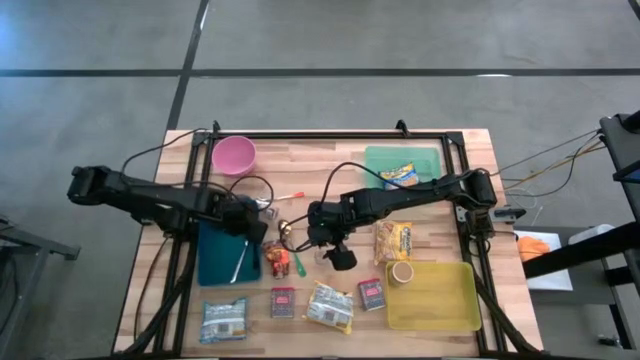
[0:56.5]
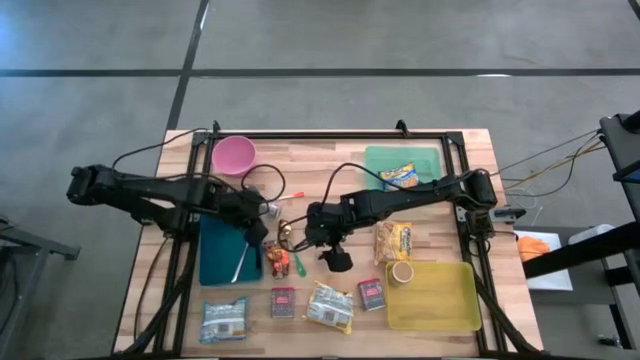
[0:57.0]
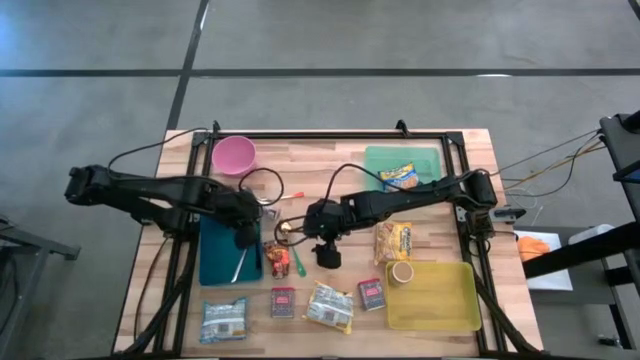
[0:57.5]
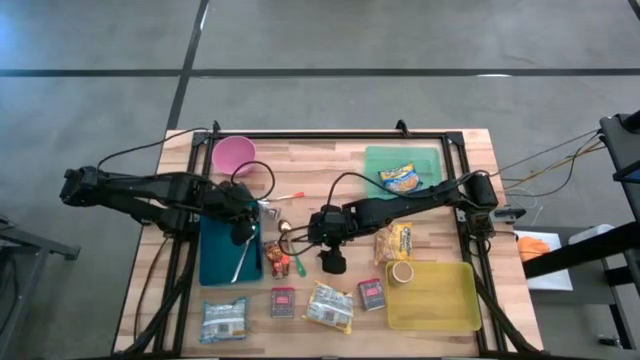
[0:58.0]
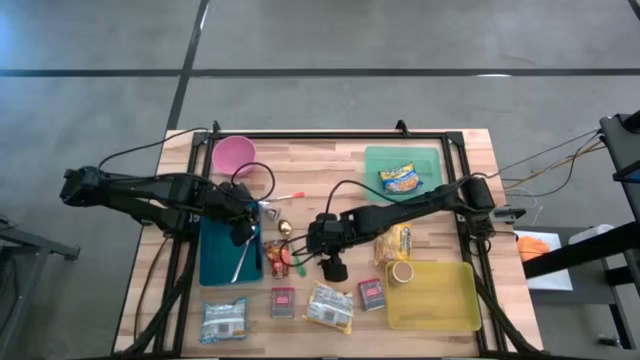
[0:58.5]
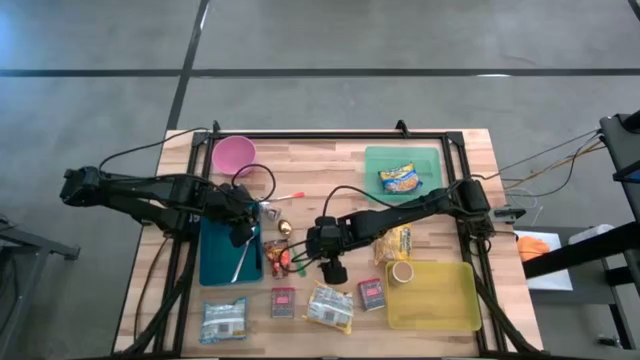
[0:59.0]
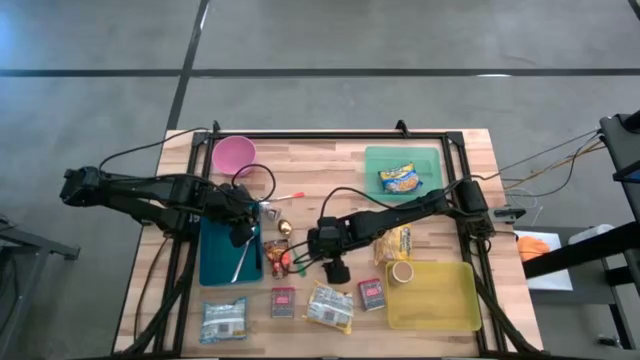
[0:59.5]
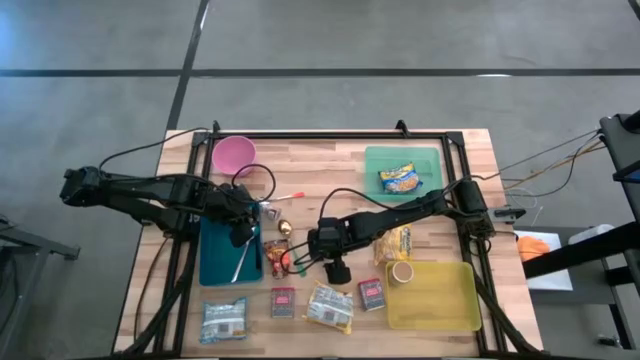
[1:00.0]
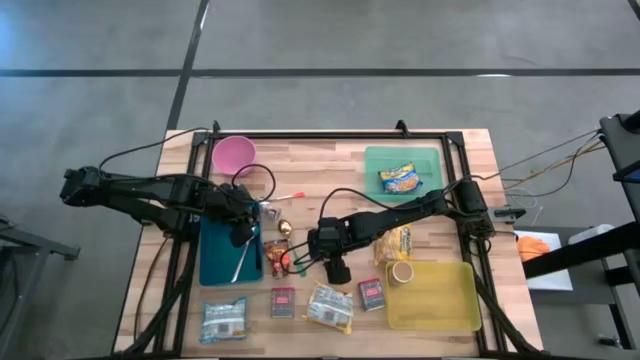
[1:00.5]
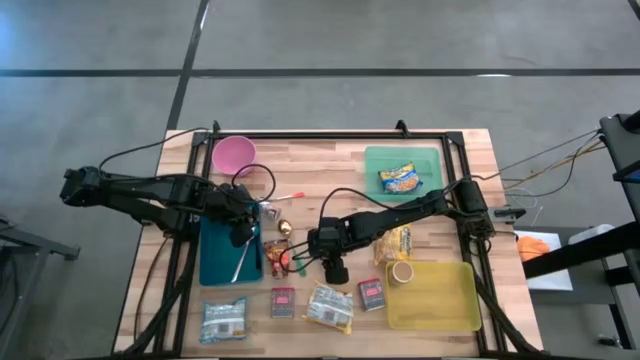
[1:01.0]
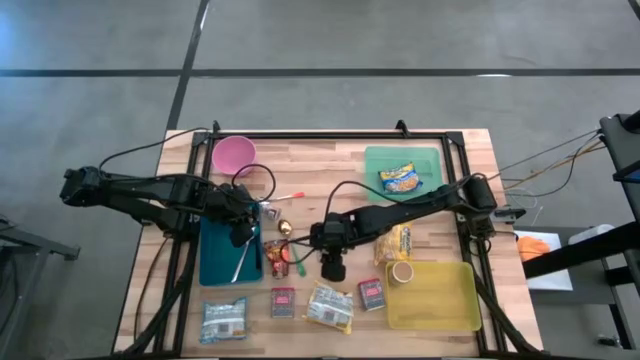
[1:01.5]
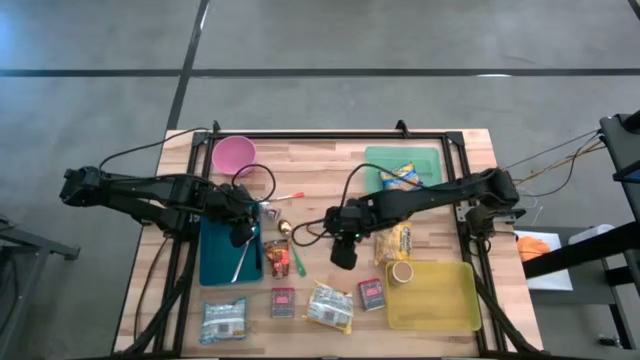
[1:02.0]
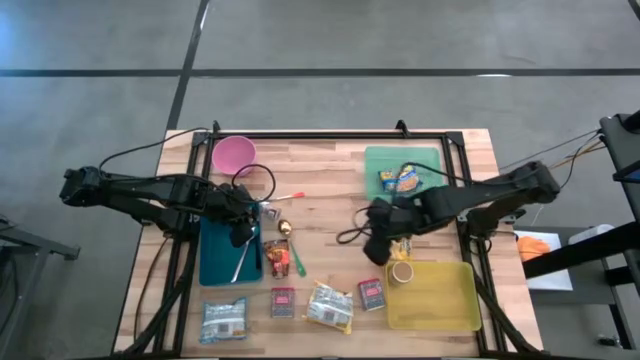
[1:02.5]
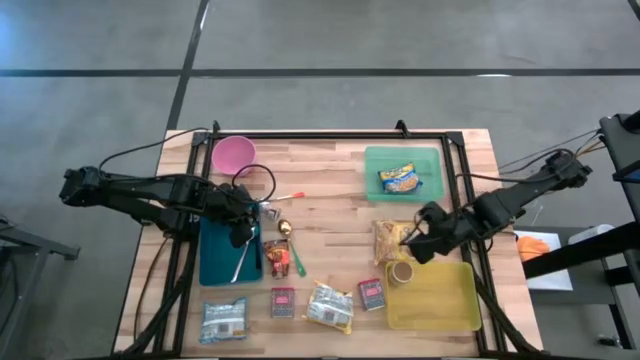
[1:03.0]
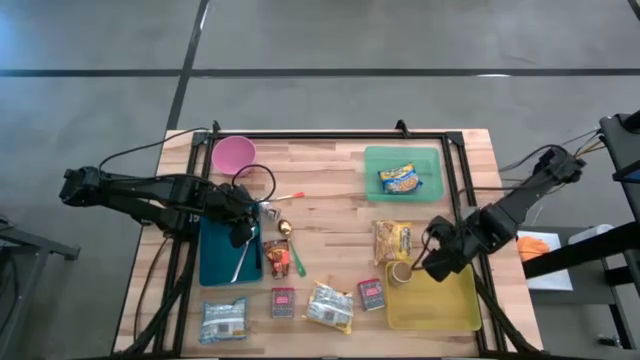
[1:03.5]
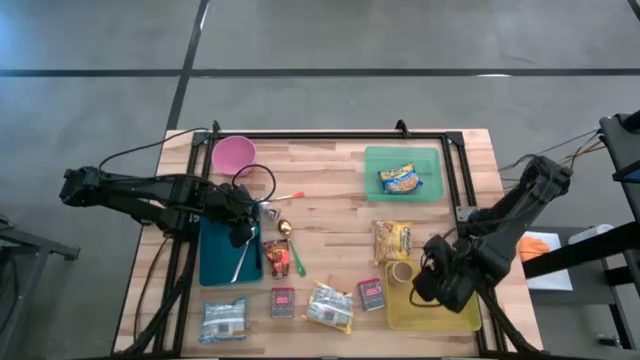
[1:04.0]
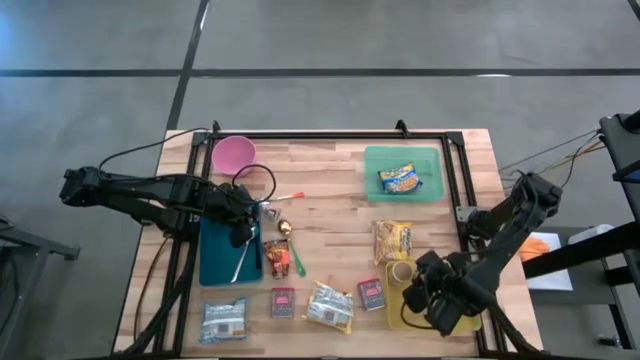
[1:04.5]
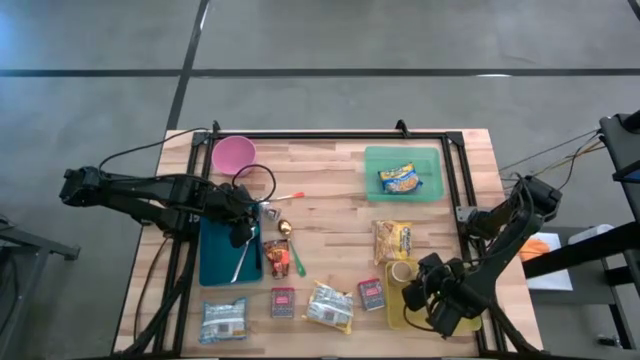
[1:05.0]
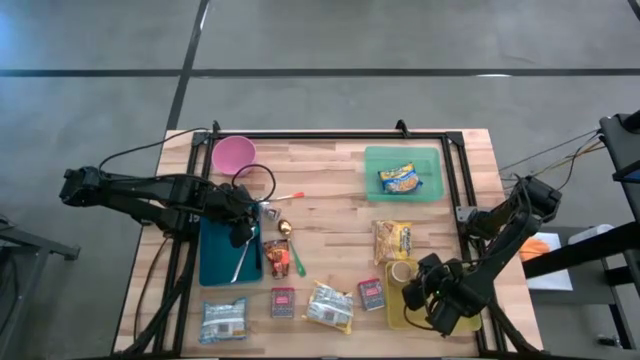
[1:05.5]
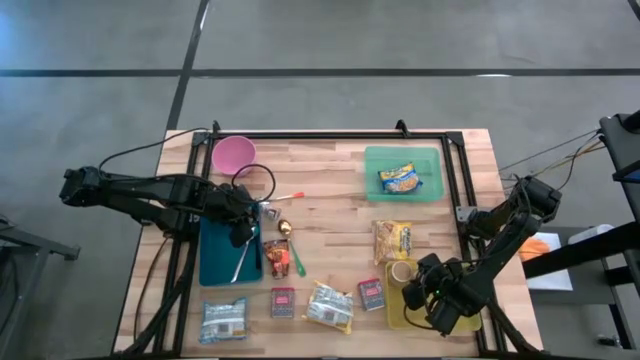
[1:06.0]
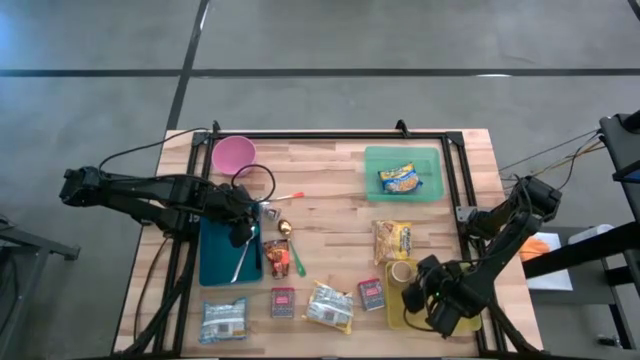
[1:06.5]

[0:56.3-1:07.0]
Put the bottom brown spice bottle into the yellow bin

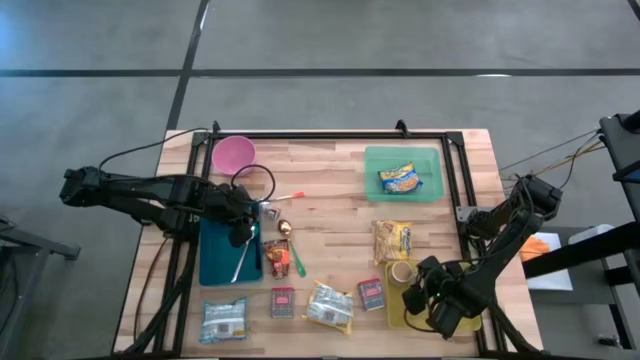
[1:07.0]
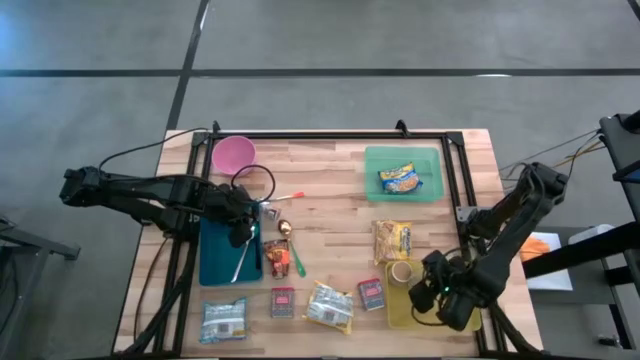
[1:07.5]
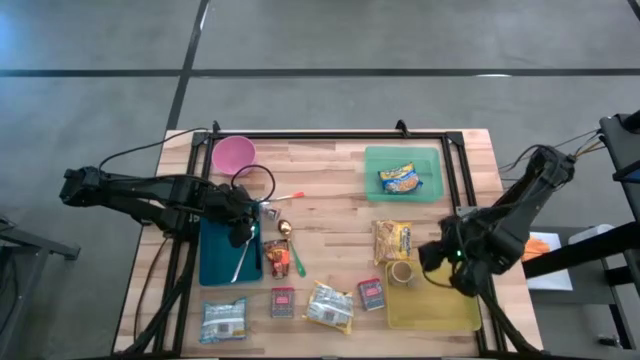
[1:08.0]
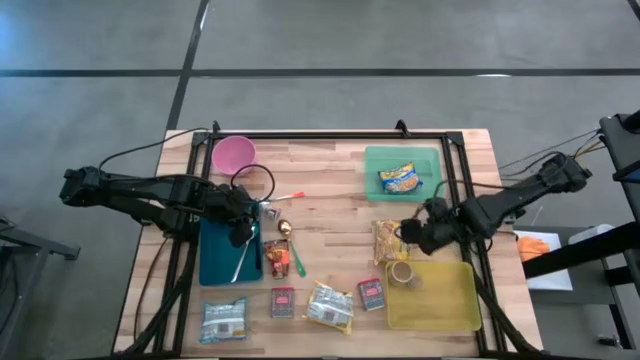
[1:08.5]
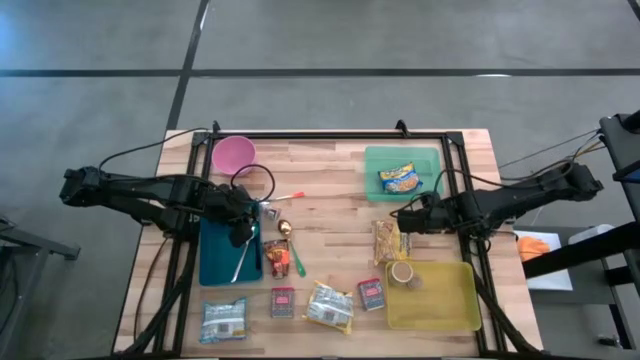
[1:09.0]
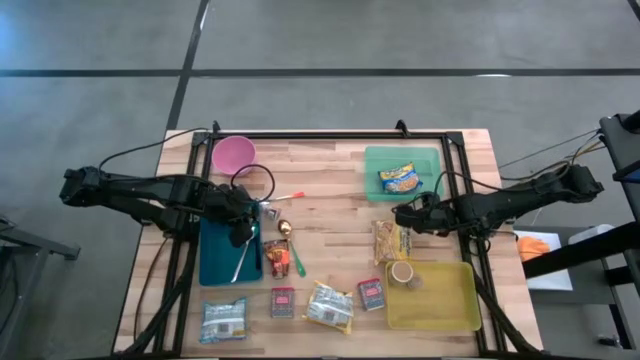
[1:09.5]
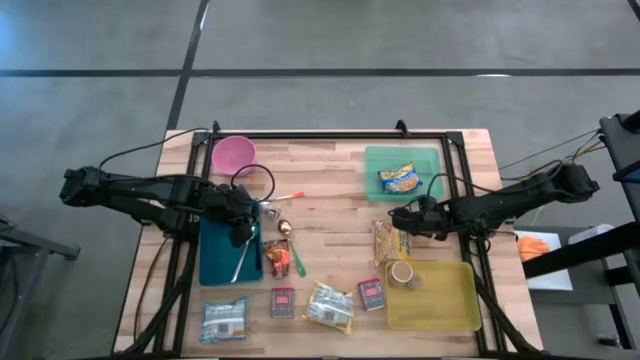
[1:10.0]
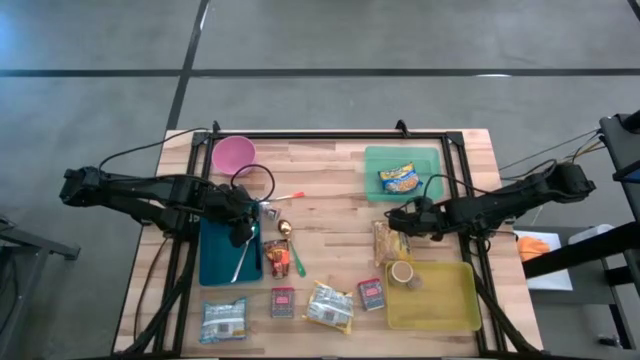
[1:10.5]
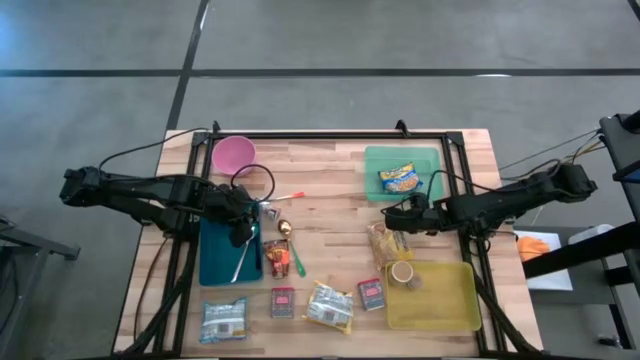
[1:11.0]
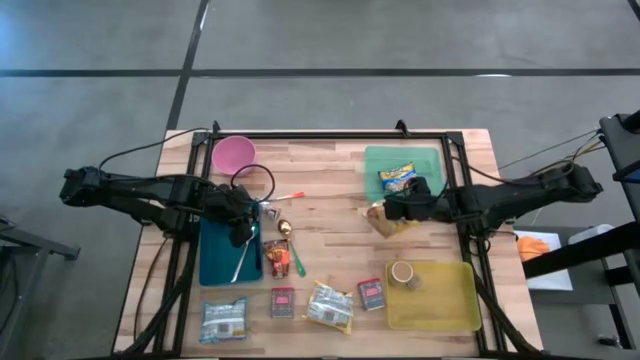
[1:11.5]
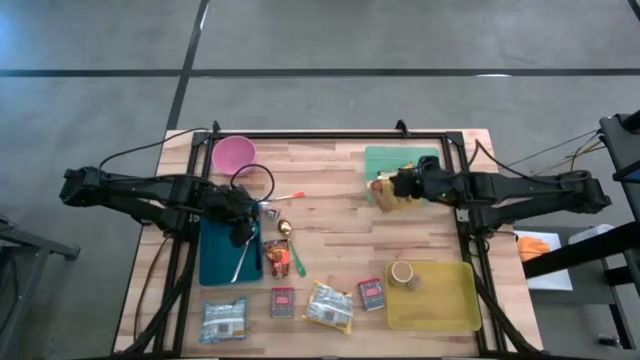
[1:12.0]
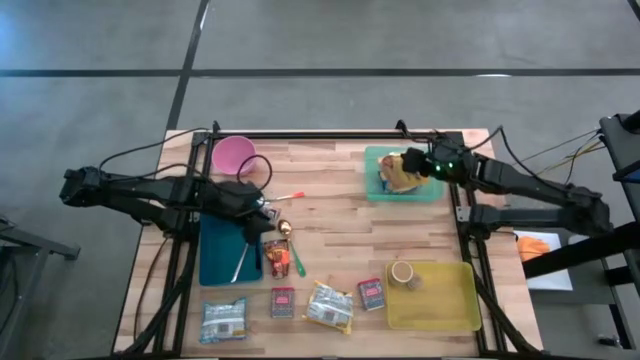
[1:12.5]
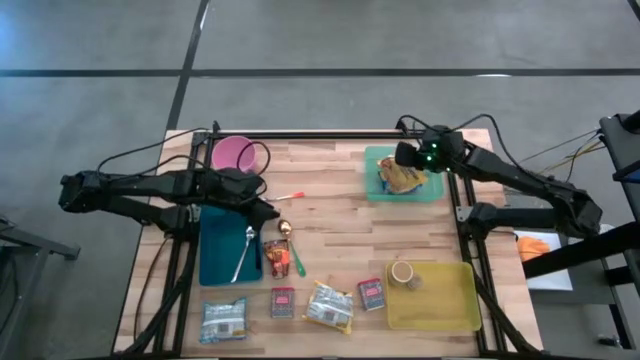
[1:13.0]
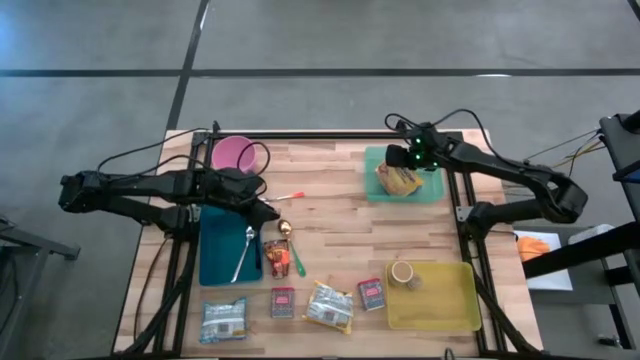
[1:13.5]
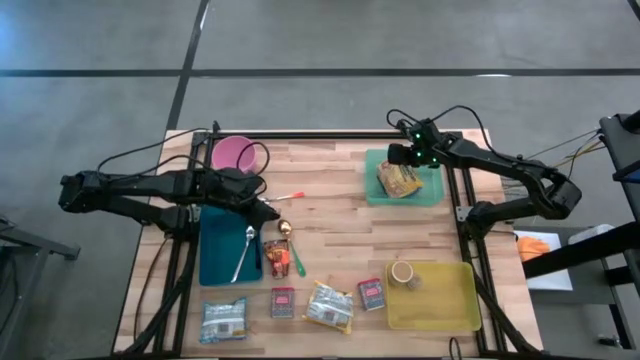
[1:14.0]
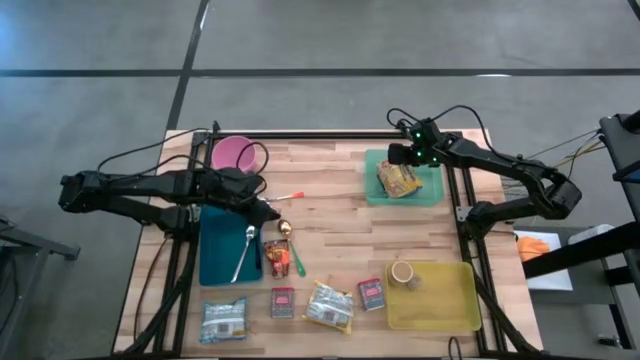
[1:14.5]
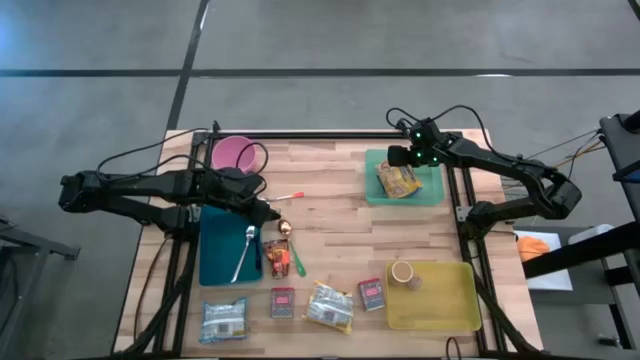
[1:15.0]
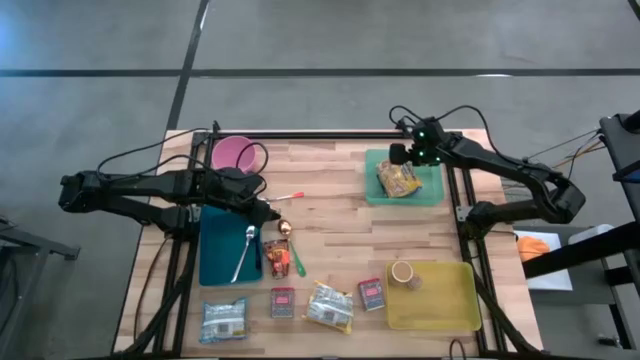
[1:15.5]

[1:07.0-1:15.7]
Put the top yellow noodle pack into the green bin
